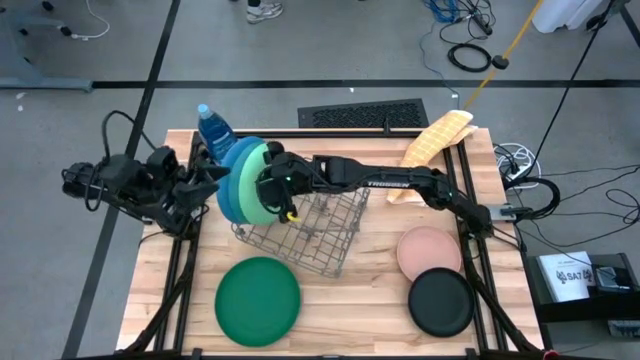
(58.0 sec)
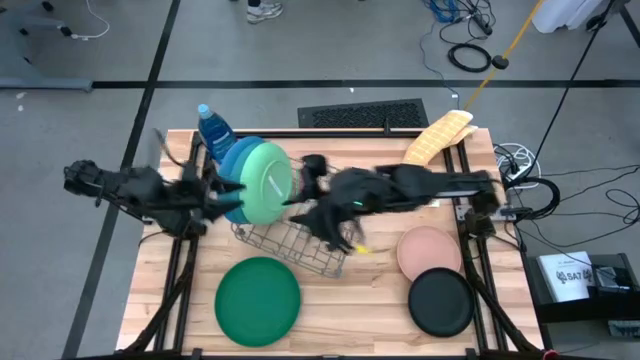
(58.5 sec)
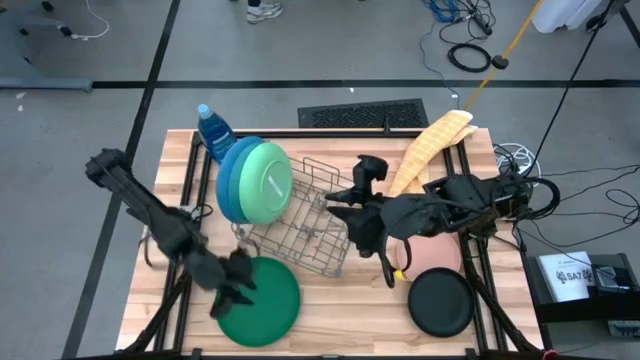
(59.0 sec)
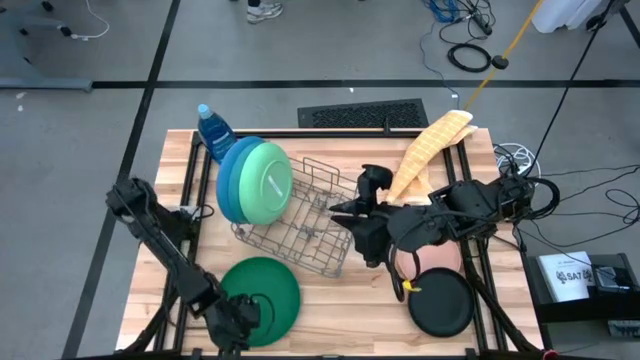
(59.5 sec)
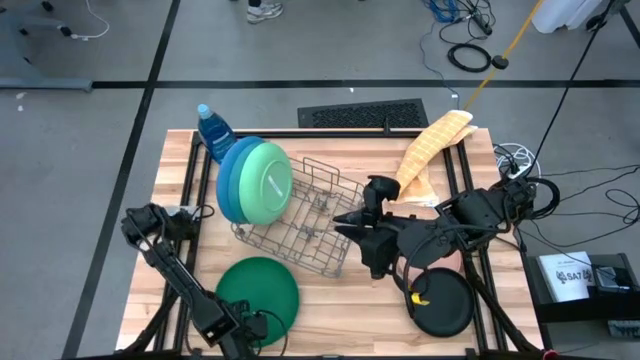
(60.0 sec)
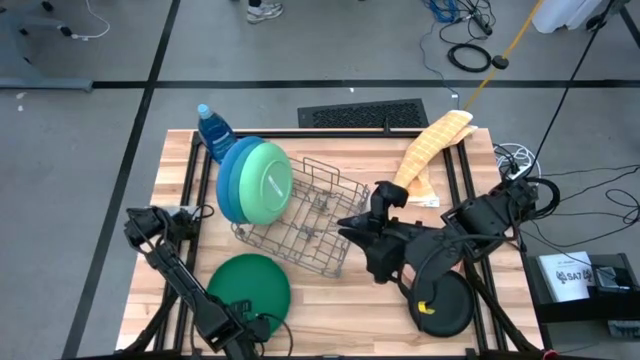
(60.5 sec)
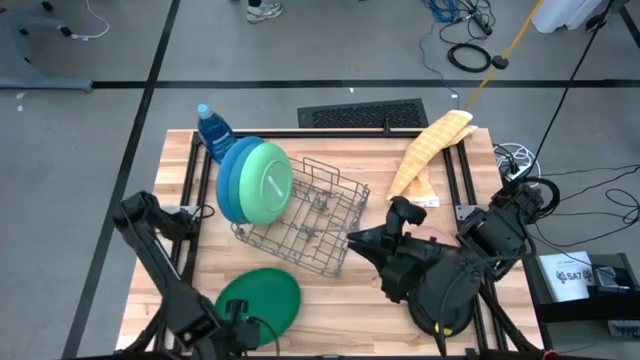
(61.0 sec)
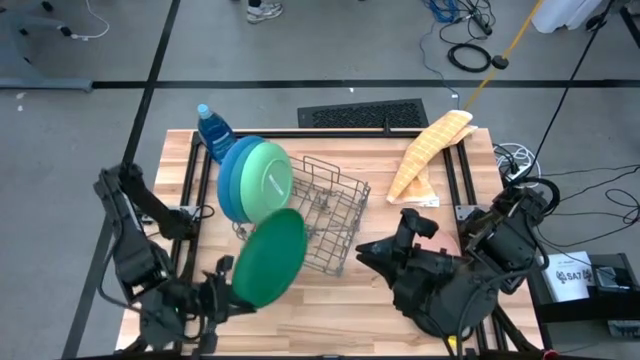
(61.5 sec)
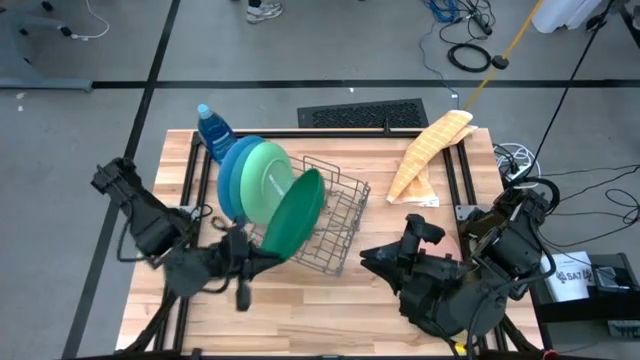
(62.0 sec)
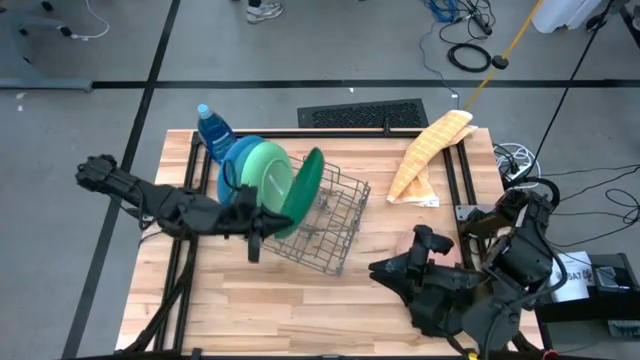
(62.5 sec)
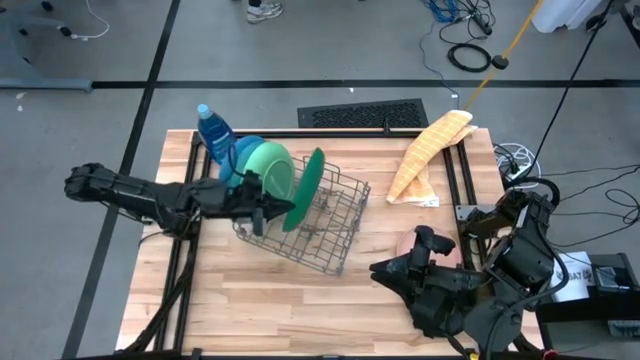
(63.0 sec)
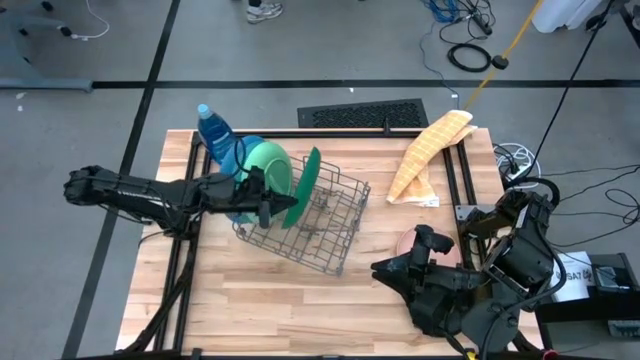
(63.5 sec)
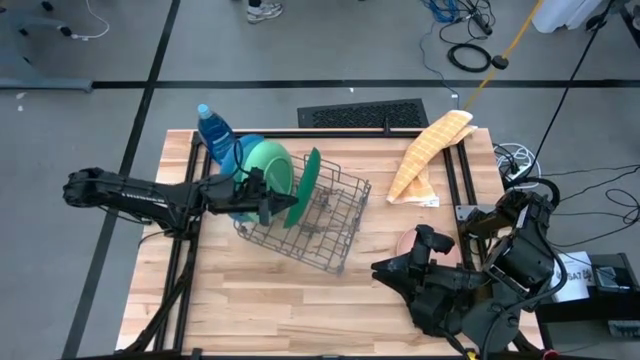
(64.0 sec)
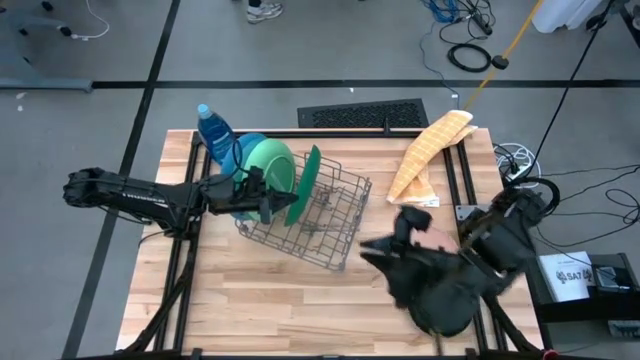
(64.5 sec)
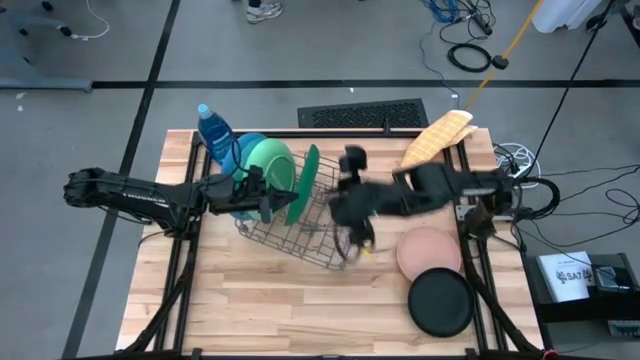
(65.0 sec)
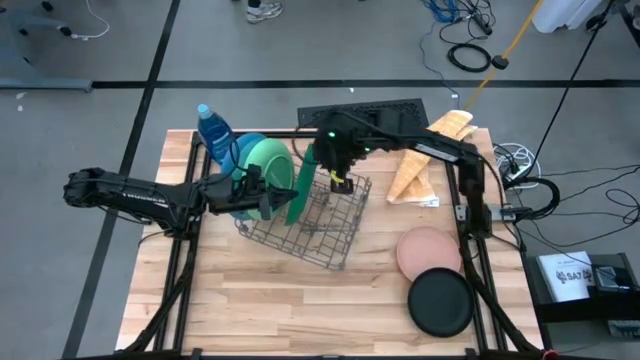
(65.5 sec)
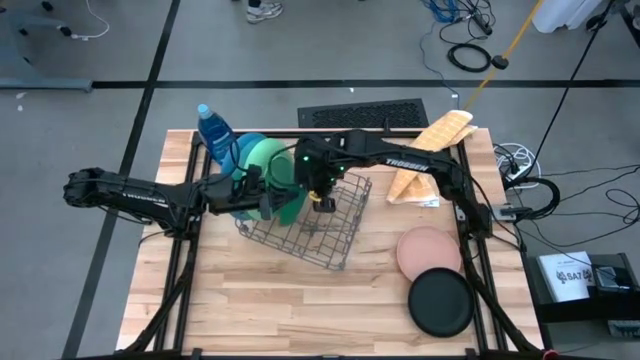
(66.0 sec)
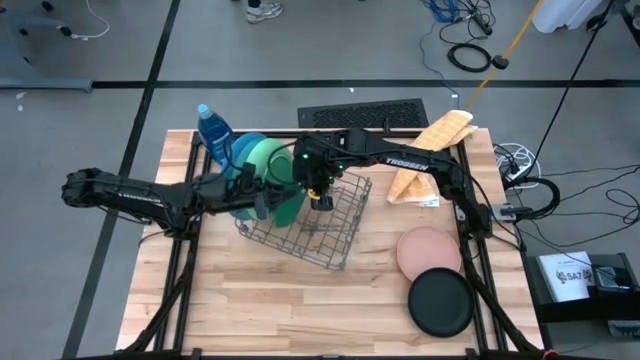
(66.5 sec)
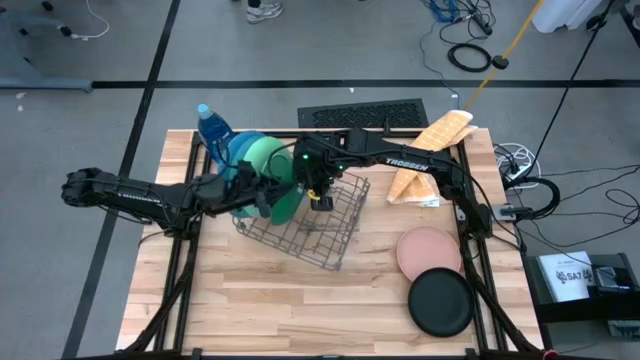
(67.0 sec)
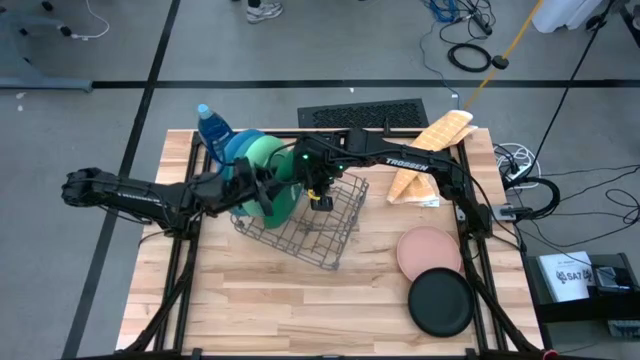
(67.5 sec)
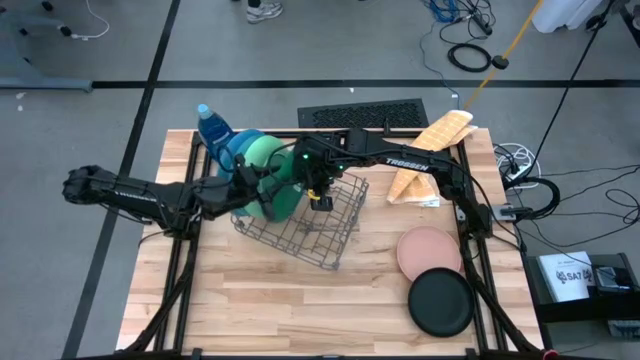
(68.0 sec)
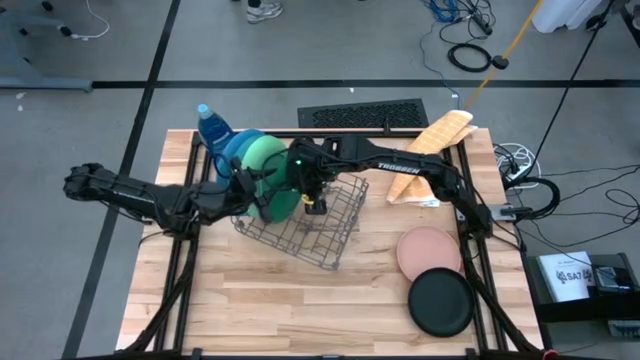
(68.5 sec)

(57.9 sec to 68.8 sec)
Task: Sort dishes
Put the green plate into the dish rack

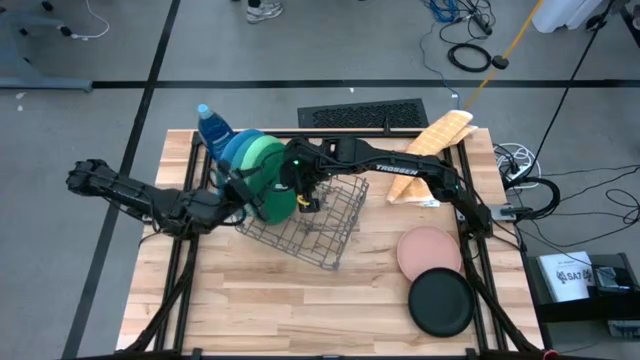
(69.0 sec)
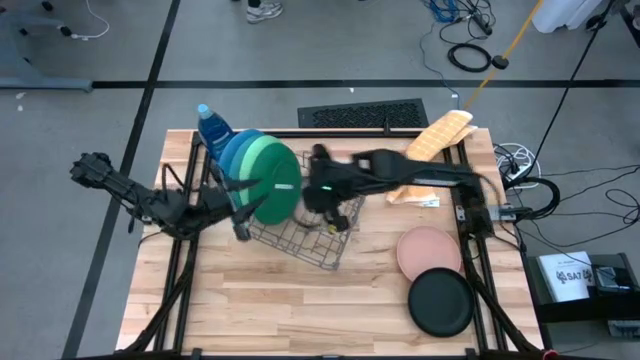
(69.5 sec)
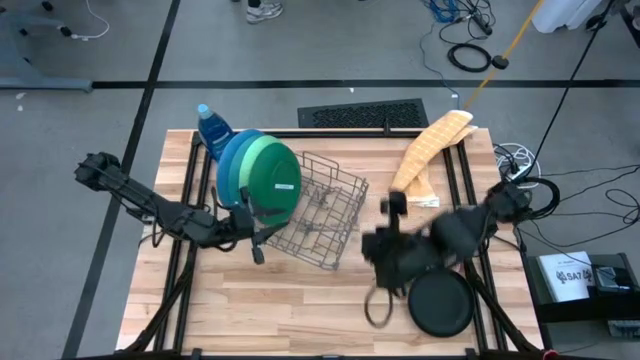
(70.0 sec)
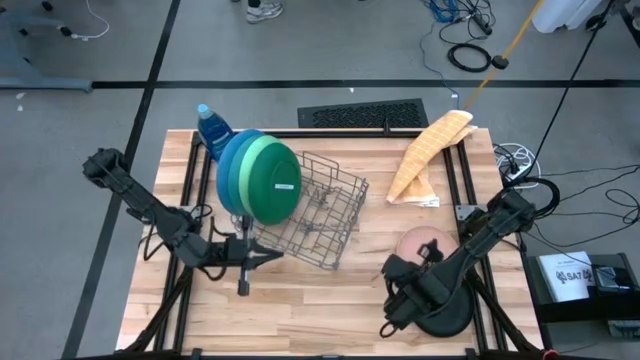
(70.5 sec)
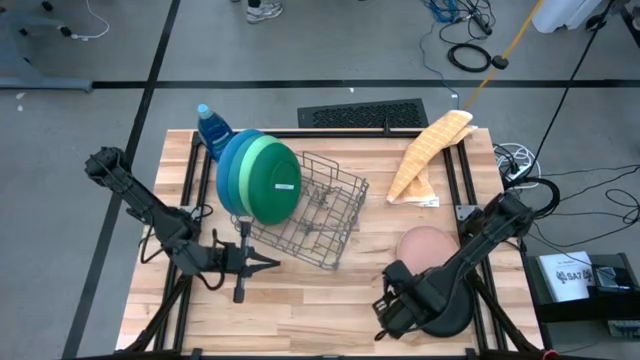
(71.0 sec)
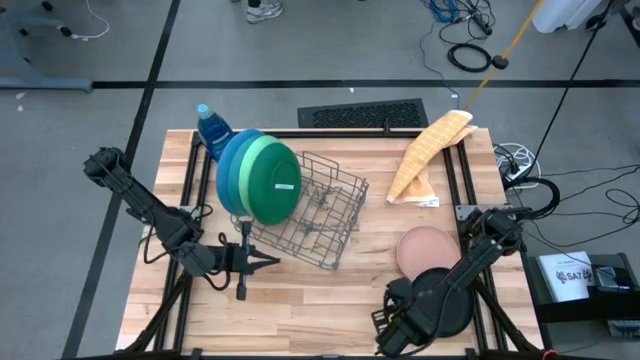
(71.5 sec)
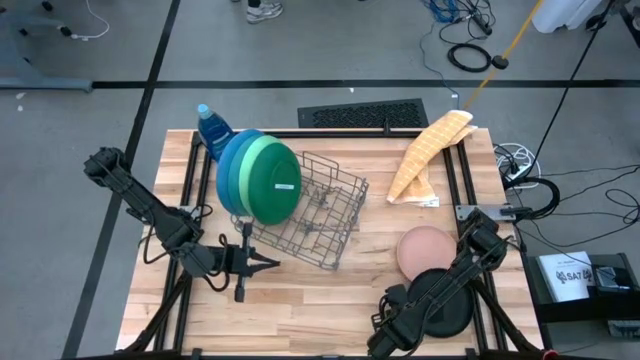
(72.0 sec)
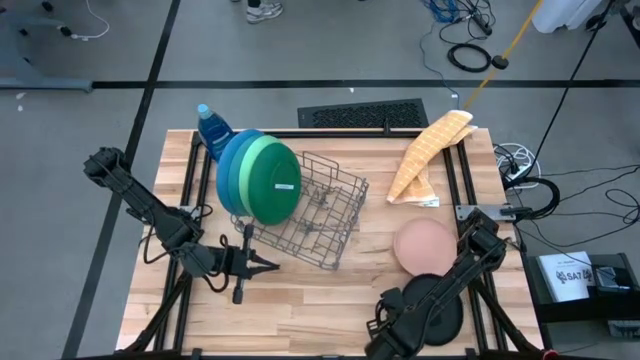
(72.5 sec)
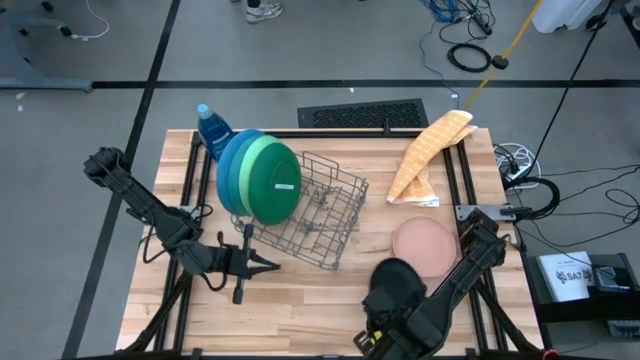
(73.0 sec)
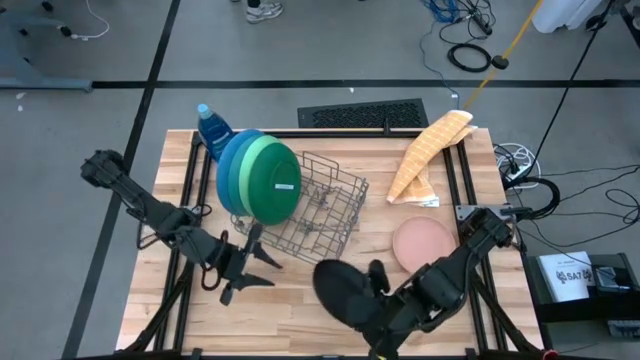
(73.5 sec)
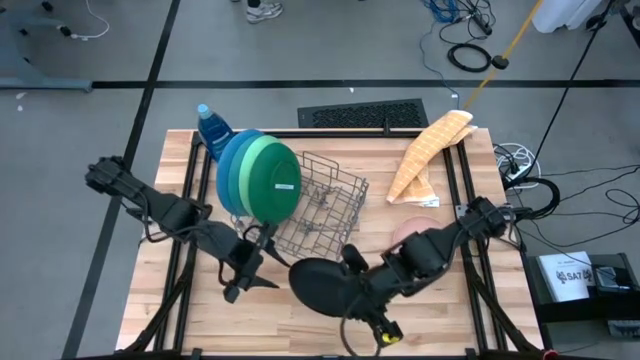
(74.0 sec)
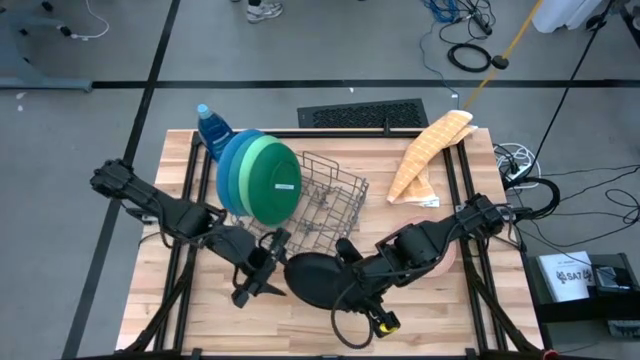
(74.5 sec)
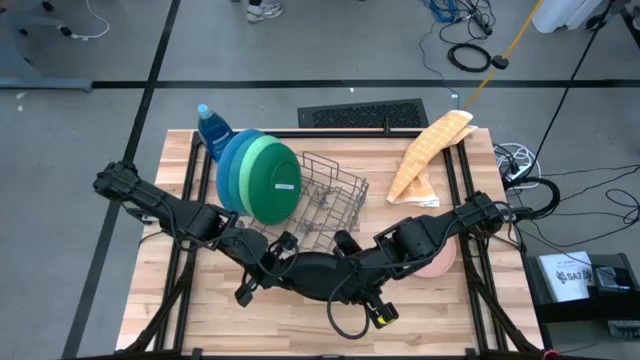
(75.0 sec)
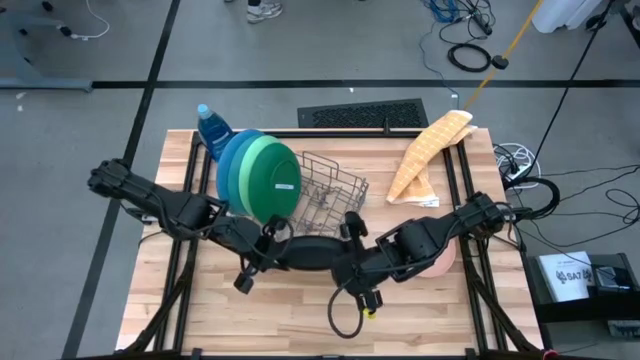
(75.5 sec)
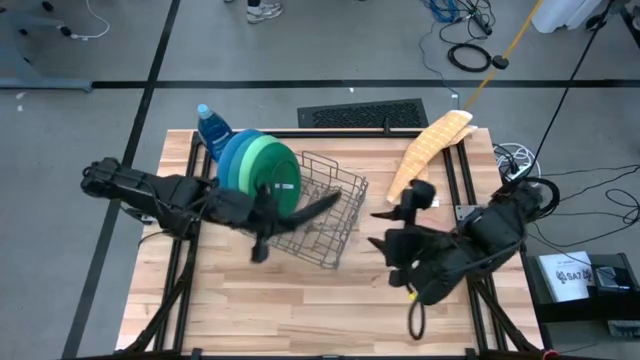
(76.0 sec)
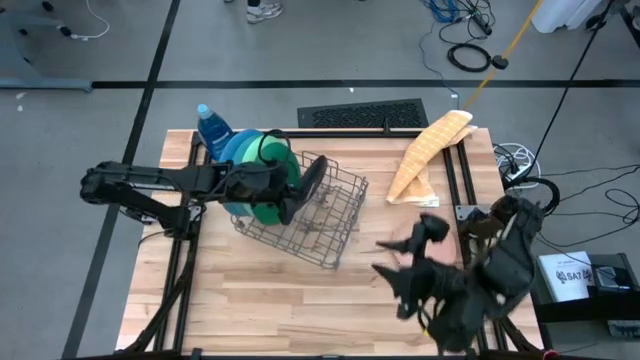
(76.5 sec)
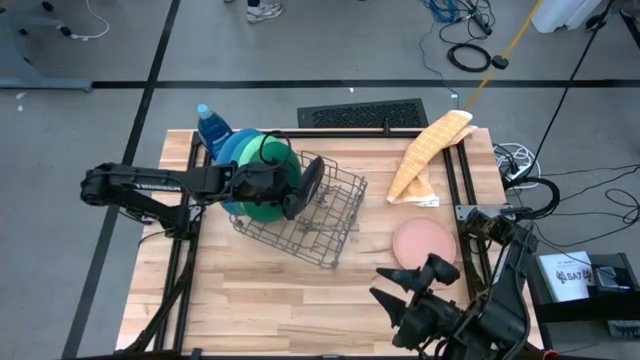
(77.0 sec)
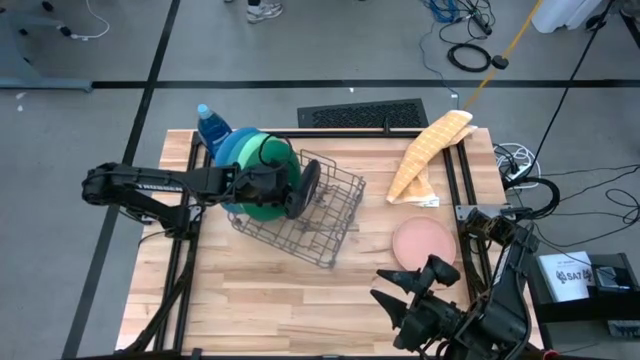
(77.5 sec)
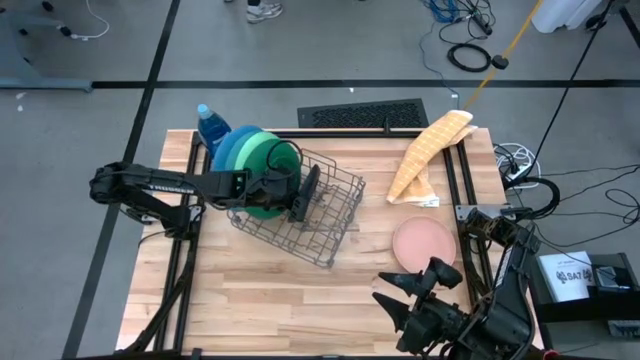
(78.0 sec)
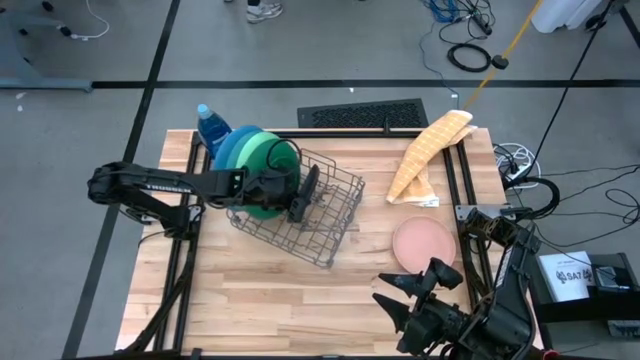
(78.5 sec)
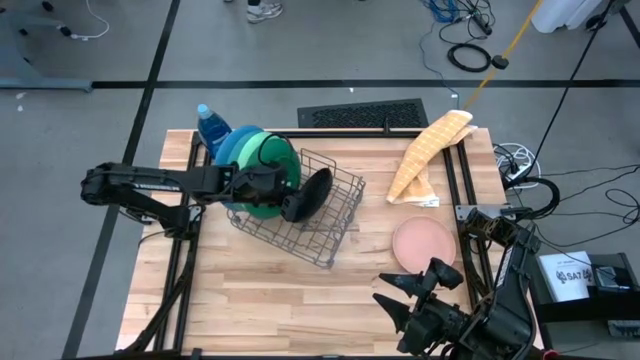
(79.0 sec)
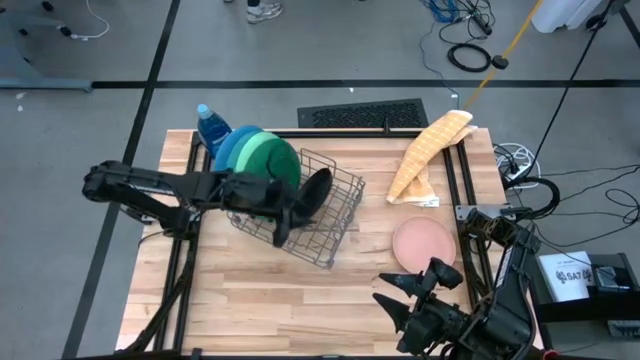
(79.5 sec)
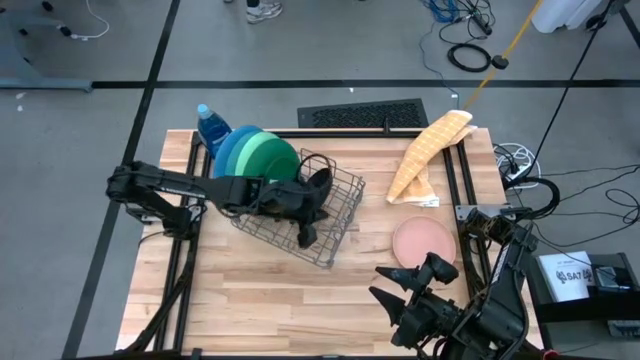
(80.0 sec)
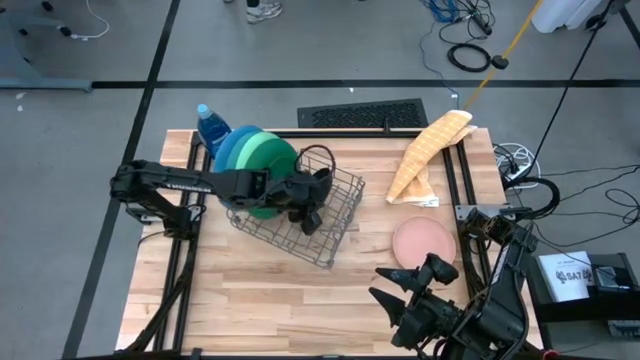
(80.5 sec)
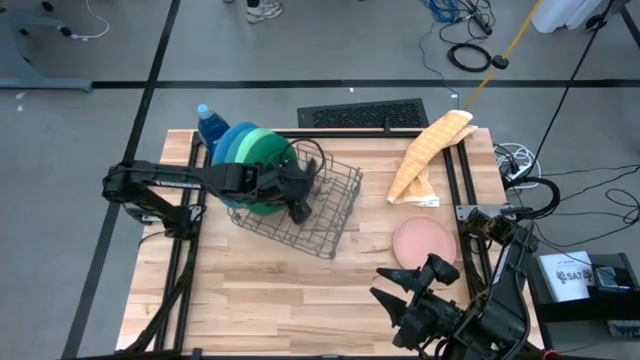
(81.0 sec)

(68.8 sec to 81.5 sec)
Put the black plate into the dishwasher rack
